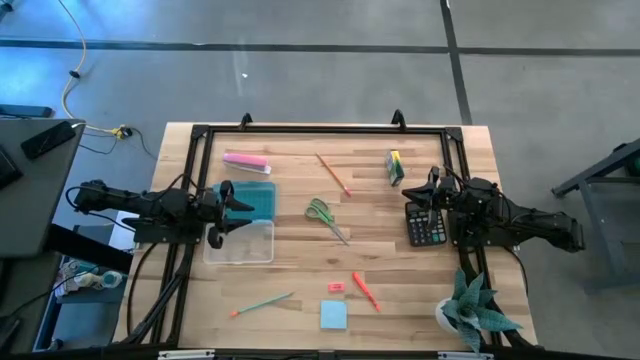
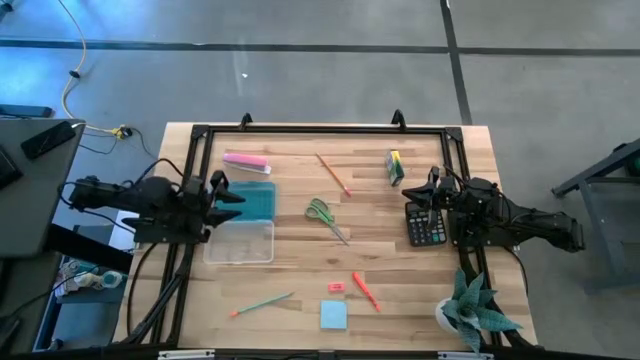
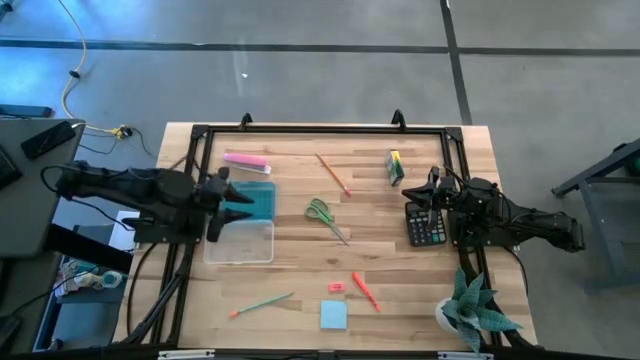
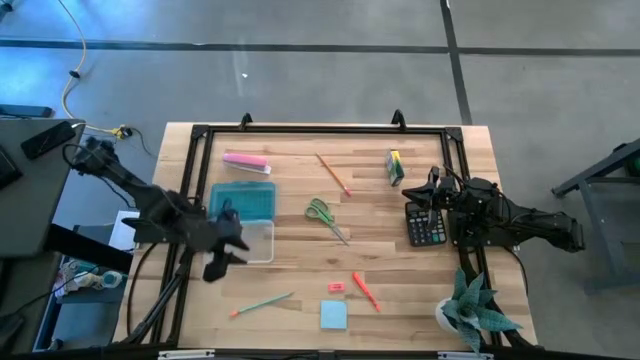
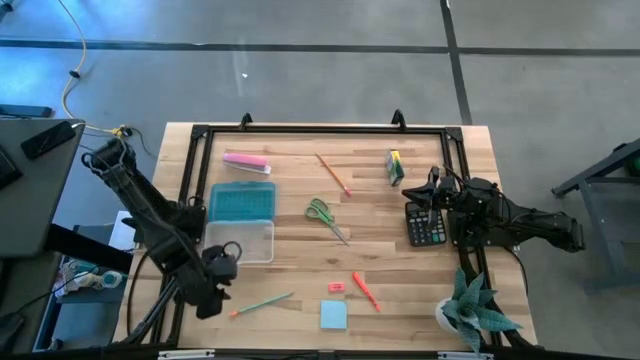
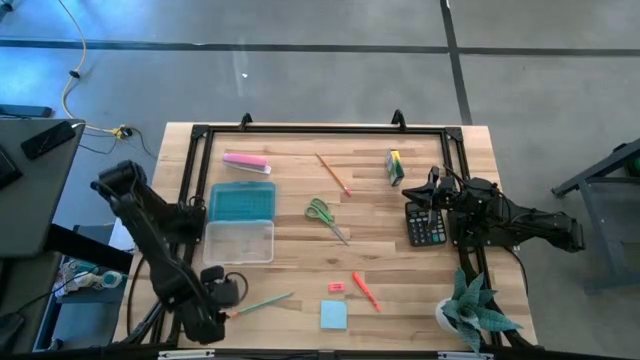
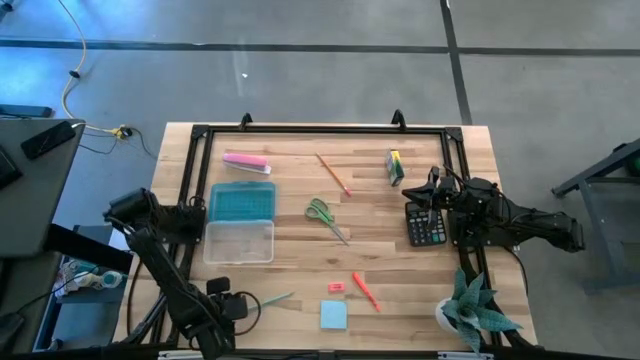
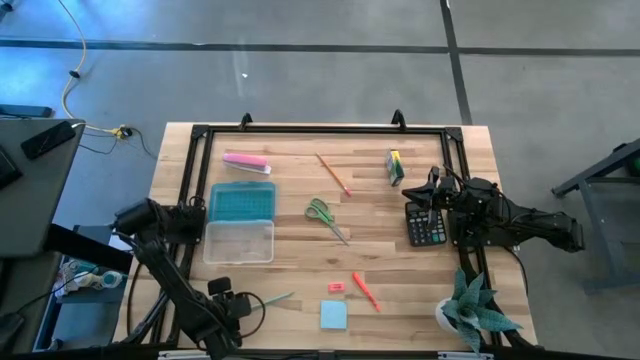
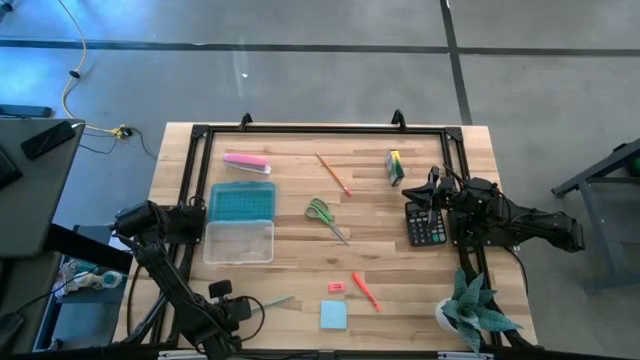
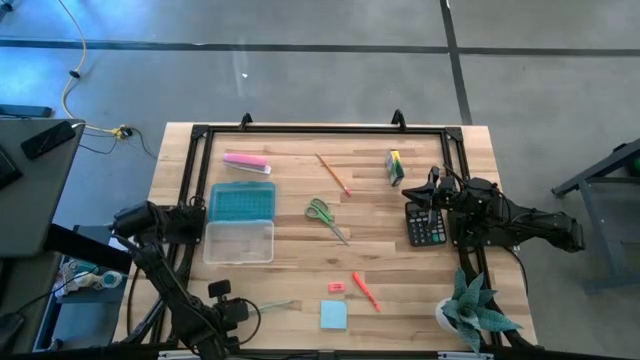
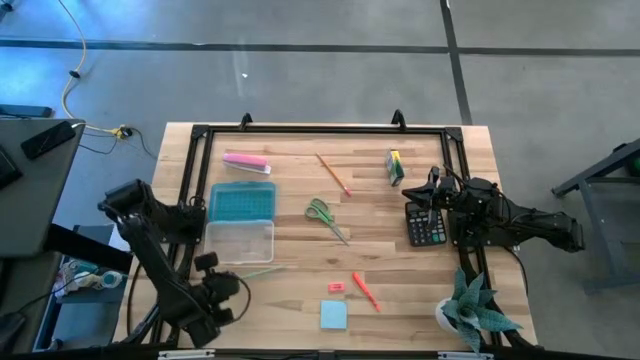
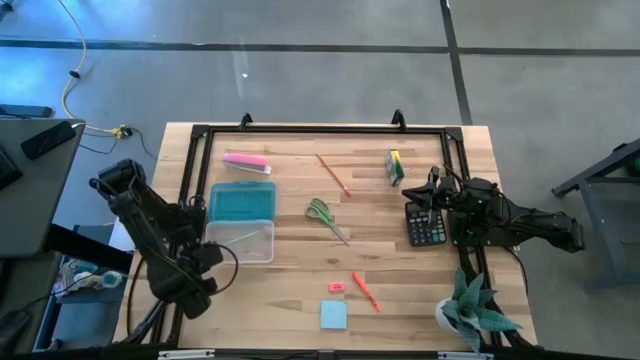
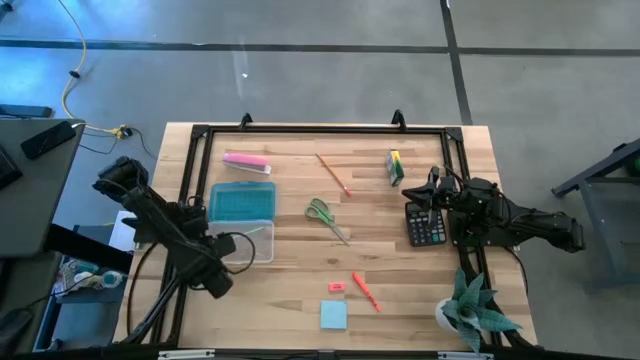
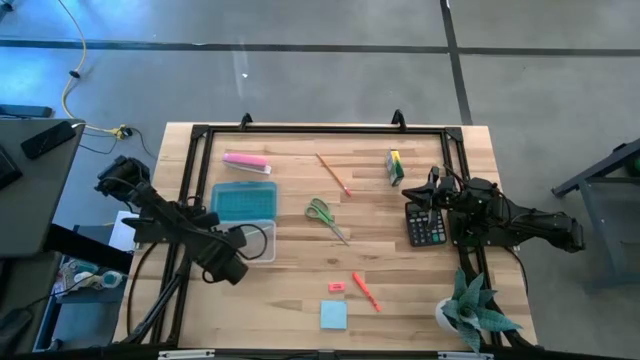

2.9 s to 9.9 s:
Task: Pack school essentials
Put the blue pencil into the supply box

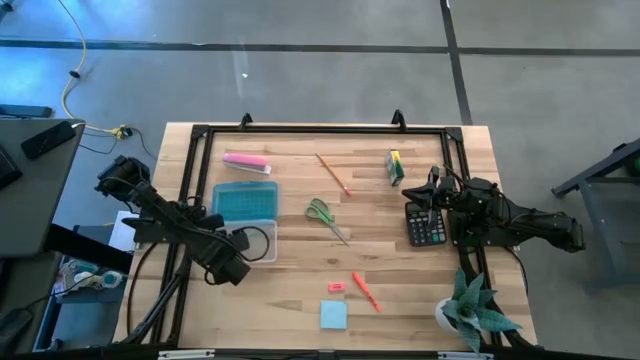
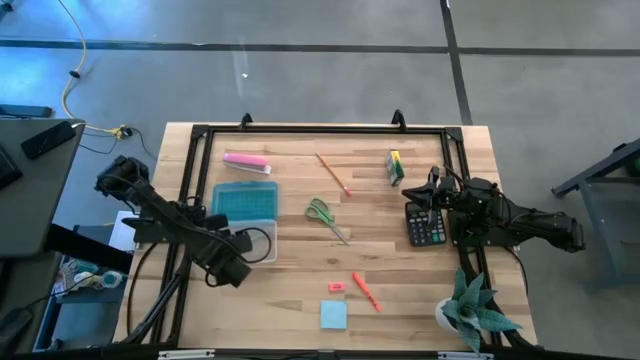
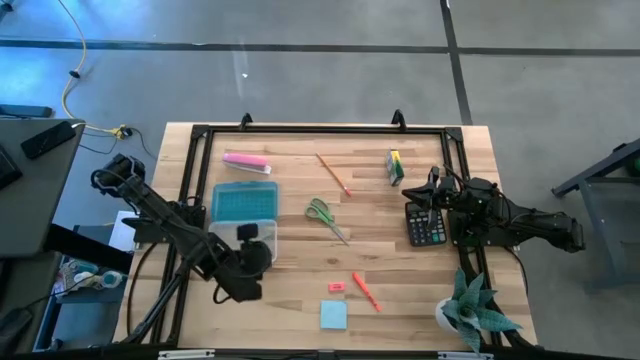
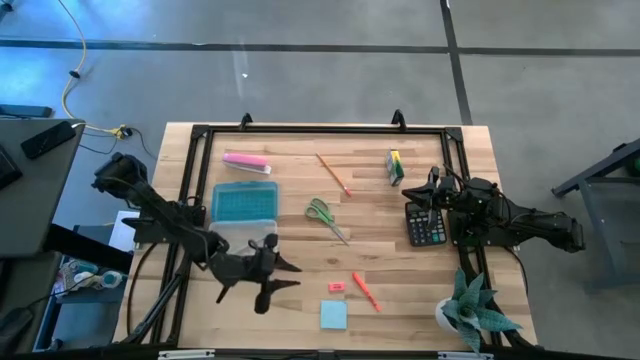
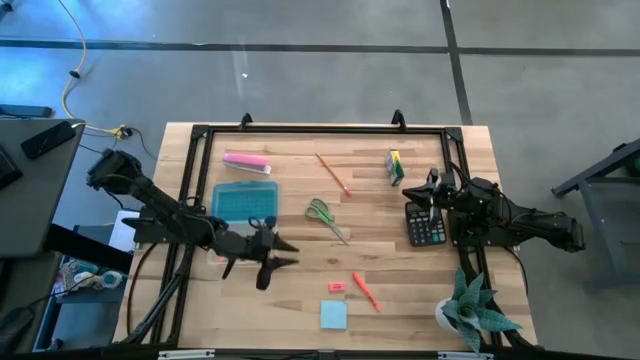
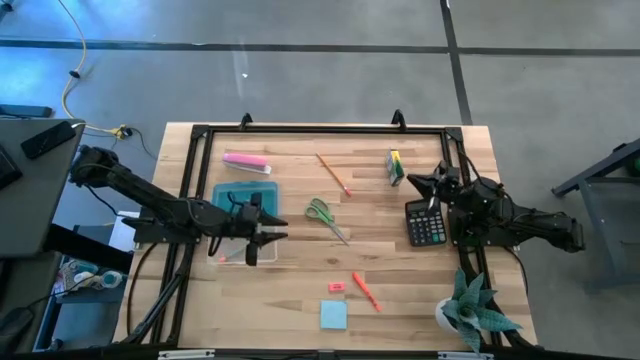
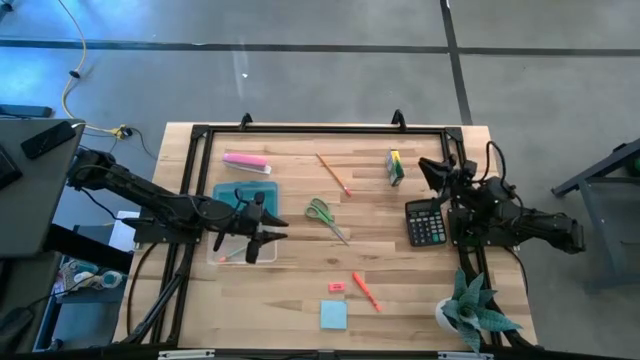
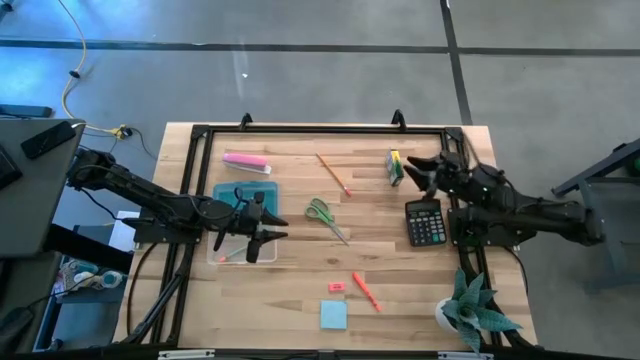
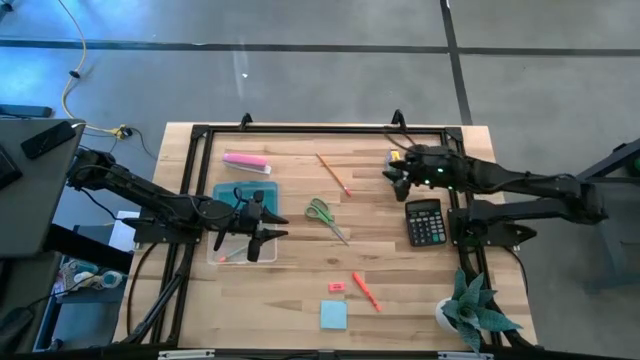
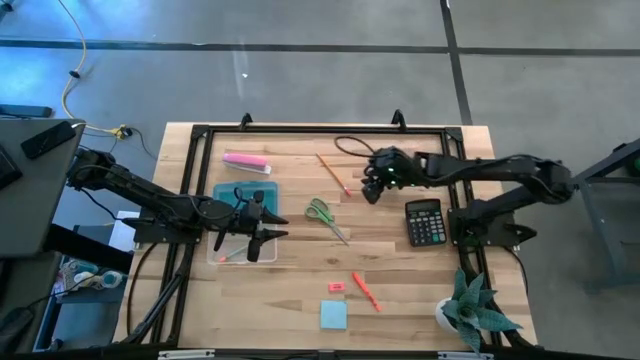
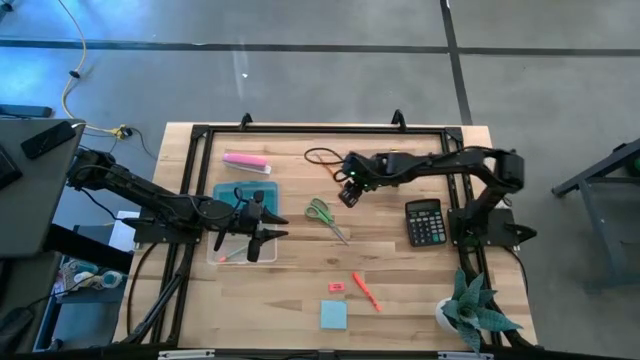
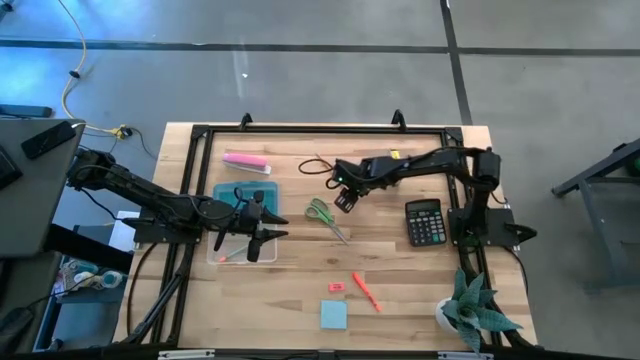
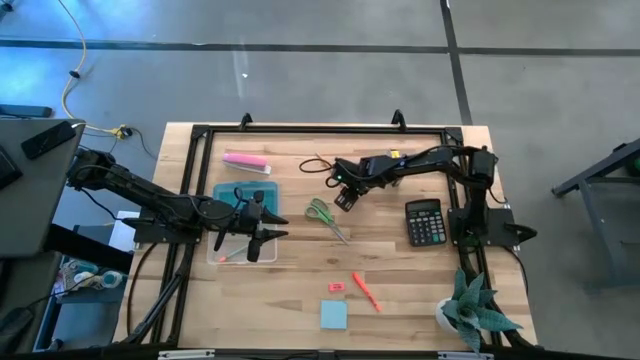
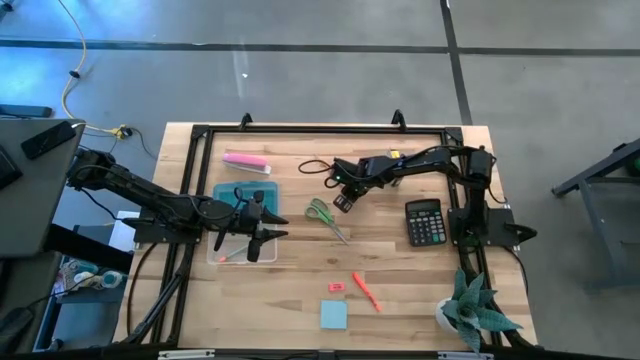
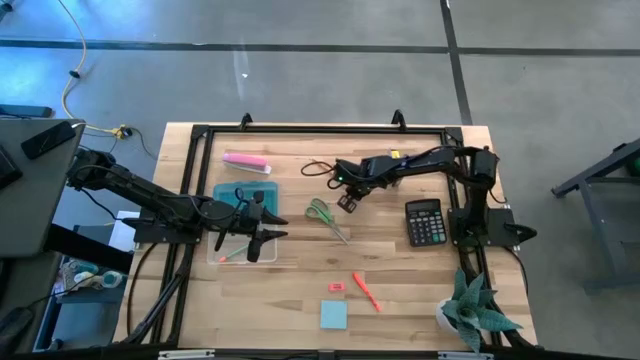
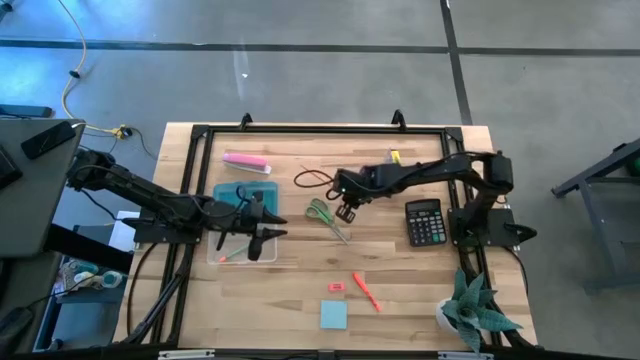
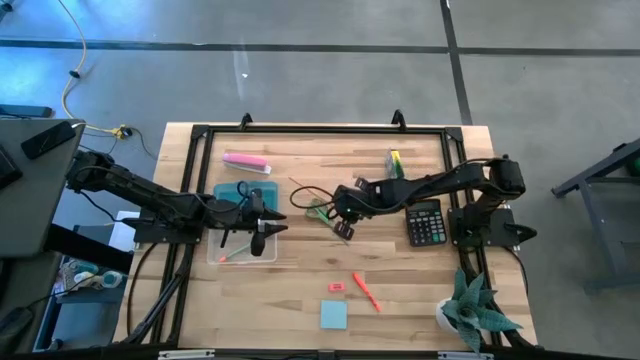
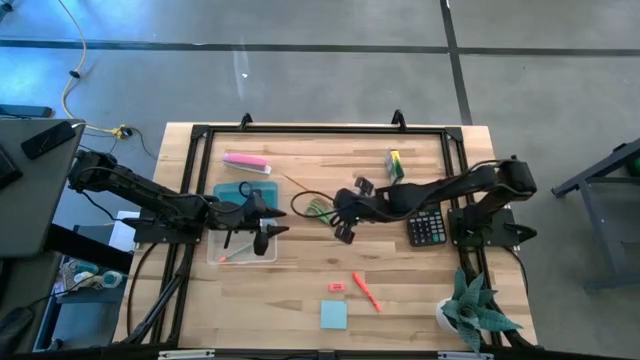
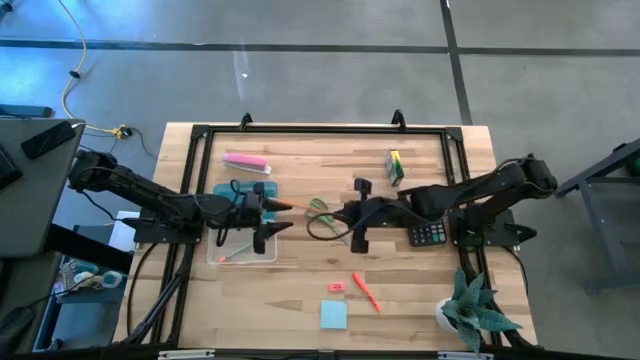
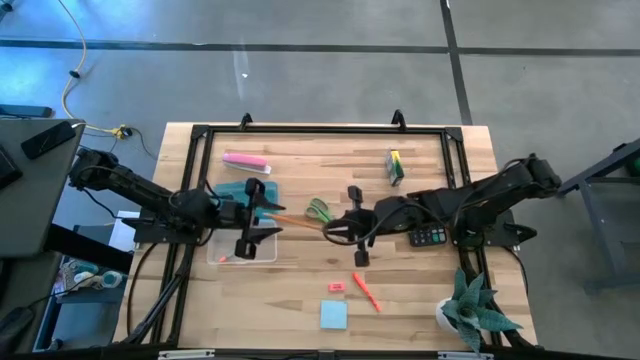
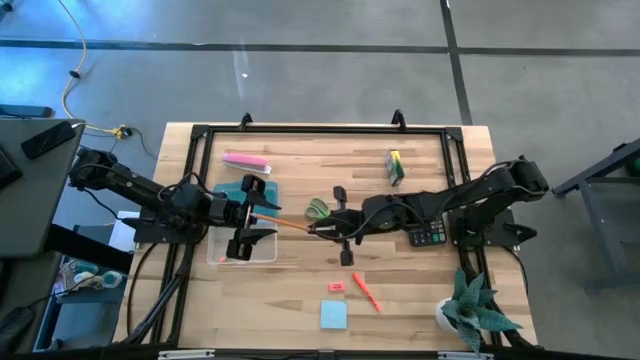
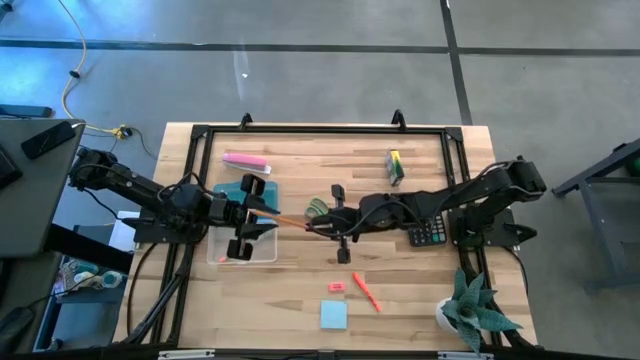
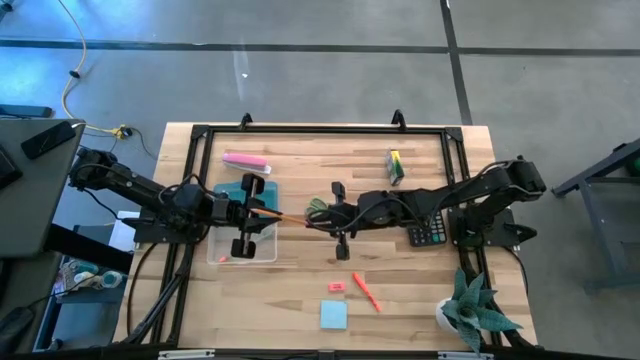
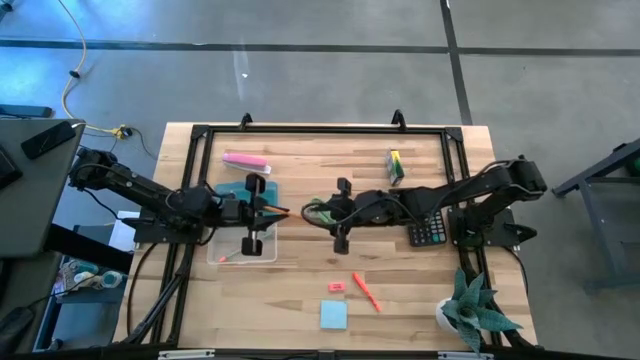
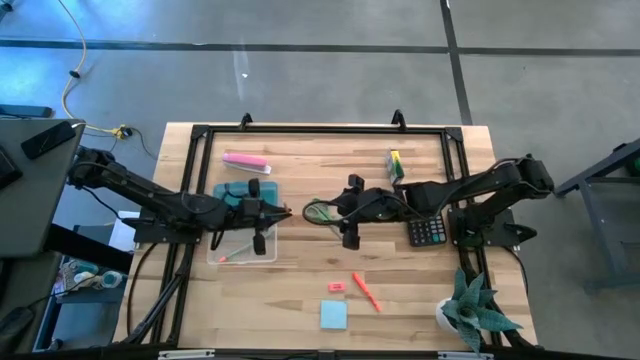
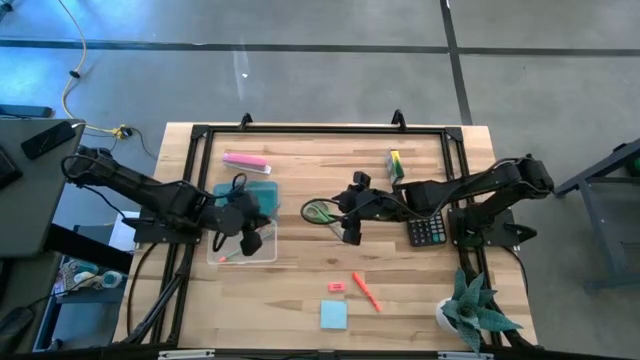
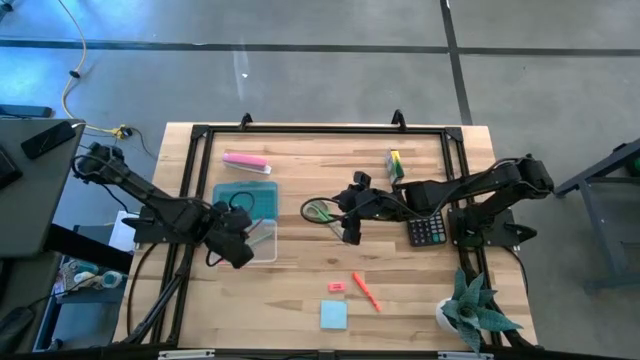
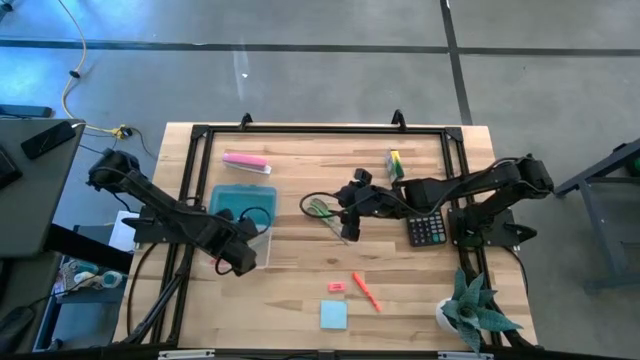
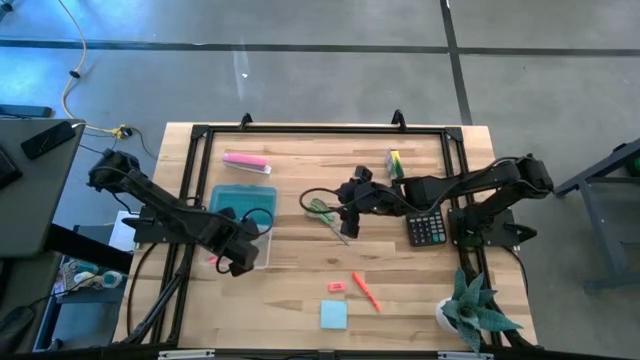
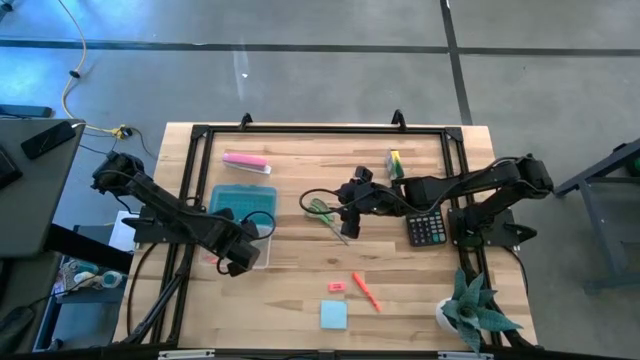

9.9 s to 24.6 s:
Put the yellow pencil into the supply box
